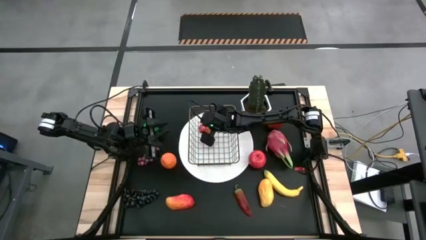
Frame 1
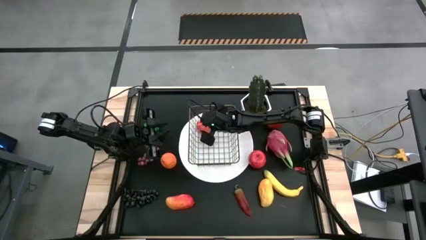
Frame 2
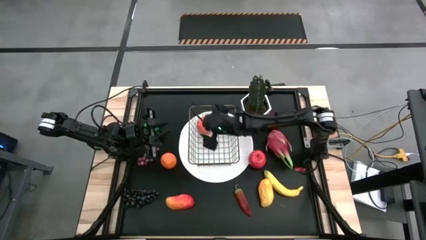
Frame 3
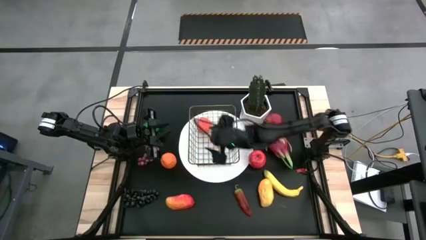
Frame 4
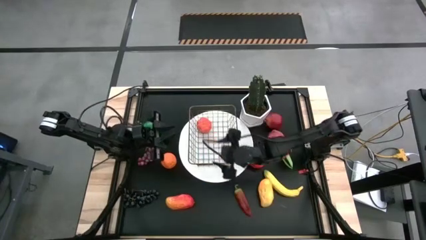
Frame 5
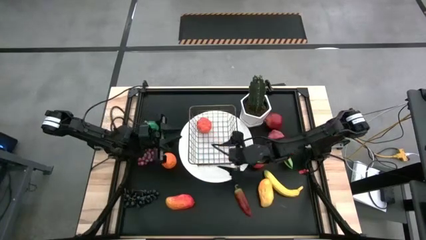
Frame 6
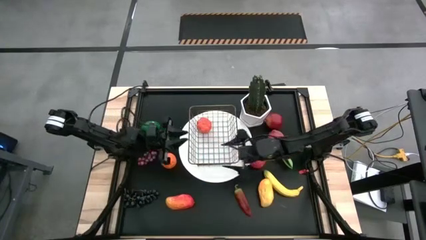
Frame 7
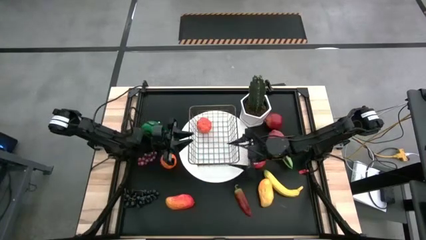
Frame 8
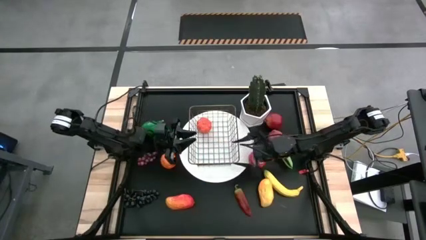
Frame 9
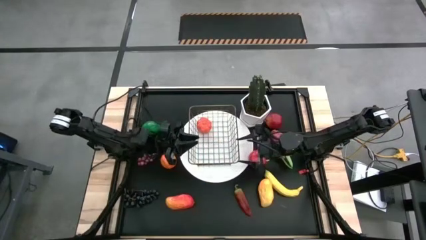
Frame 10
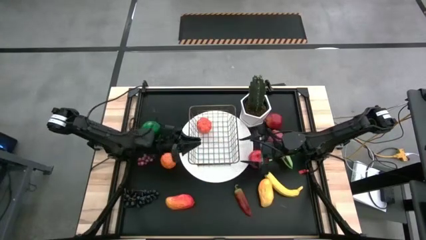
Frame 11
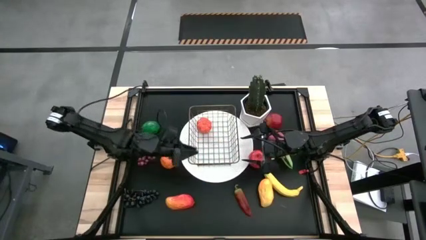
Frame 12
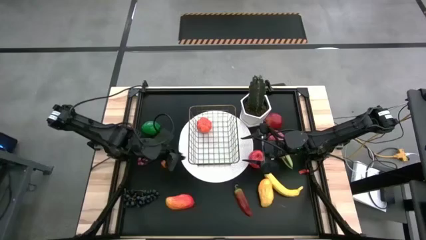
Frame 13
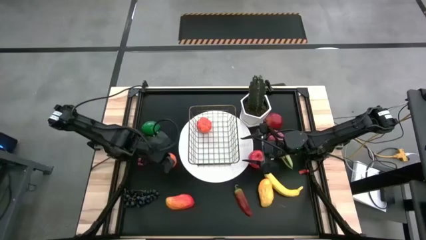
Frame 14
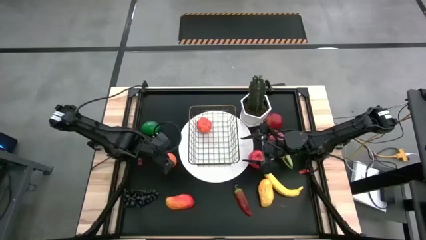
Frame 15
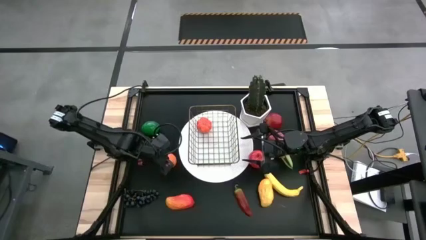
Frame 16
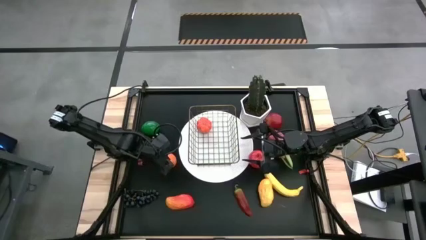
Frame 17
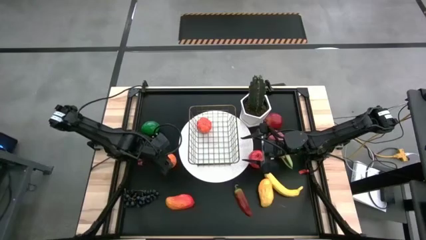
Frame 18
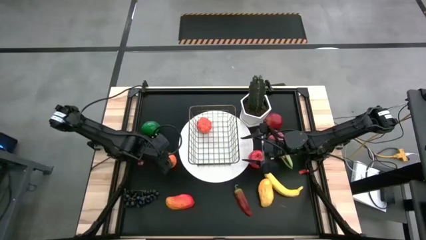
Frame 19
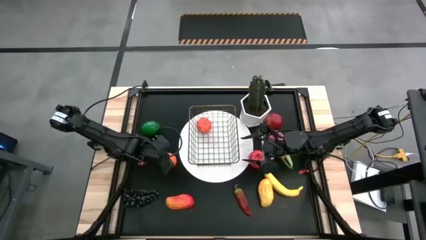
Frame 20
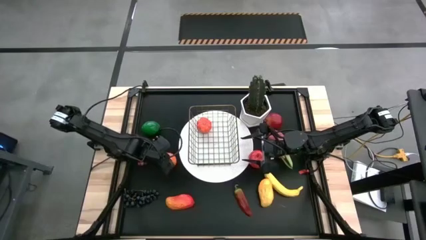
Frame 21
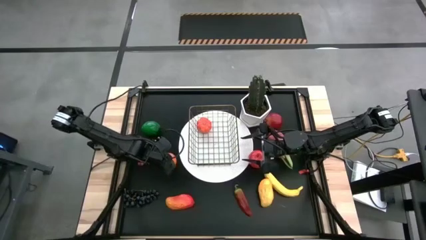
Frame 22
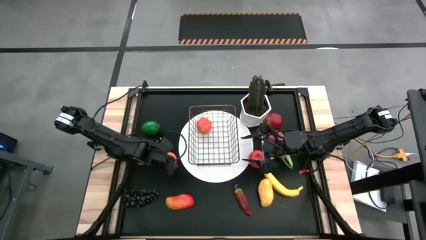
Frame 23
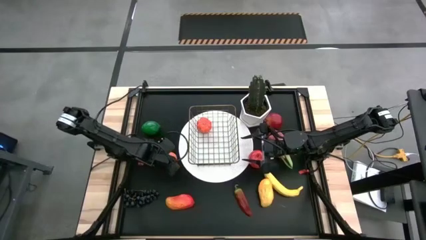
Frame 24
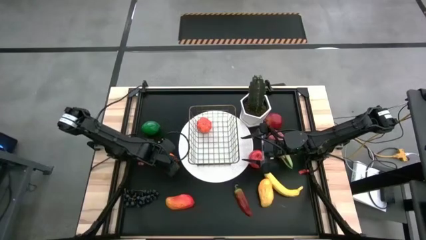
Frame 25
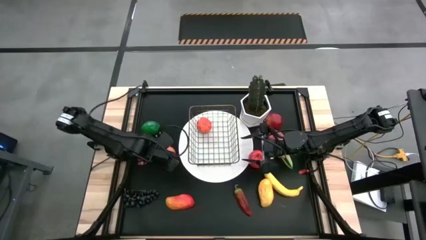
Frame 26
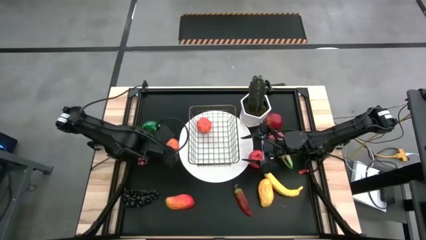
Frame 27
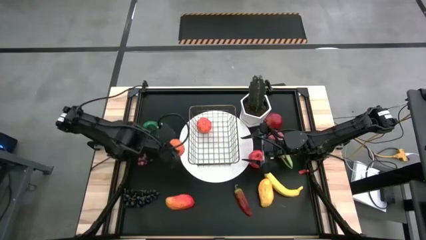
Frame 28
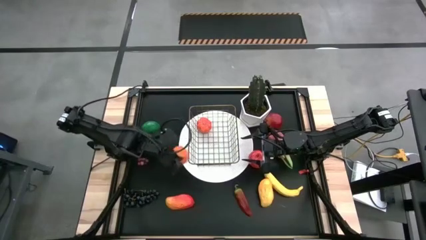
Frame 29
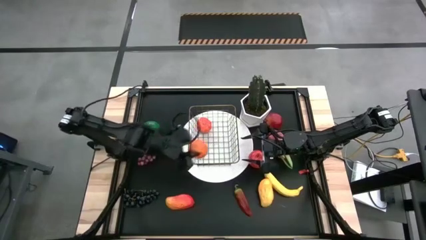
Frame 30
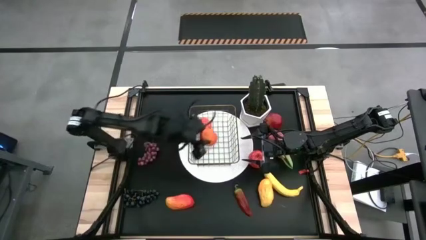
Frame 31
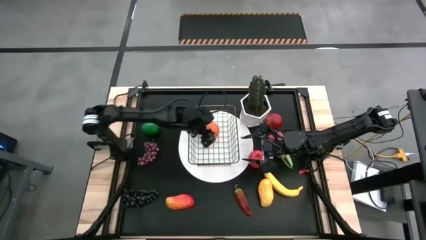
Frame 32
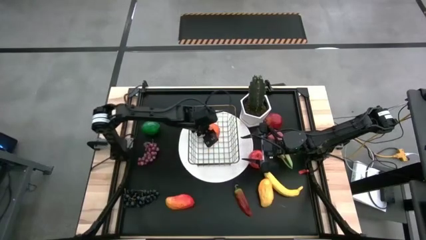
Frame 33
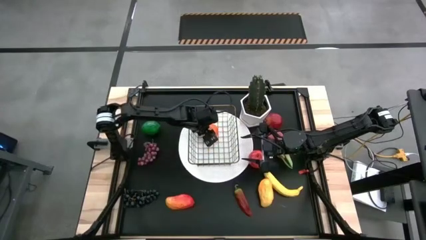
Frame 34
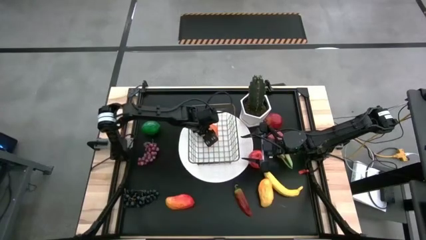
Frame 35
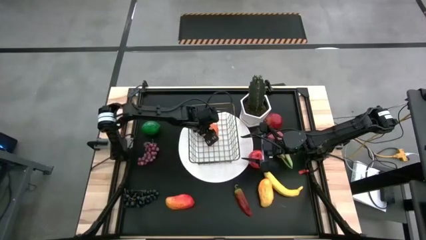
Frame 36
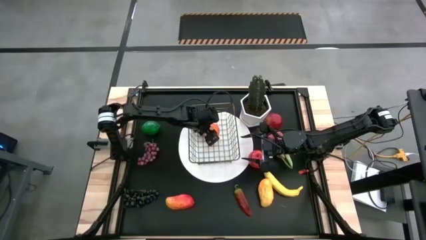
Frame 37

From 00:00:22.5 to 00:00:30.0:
Task: Build produce basket
Put the orange into the gold wire basket

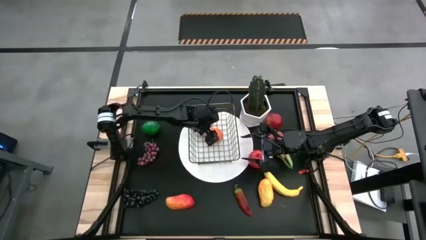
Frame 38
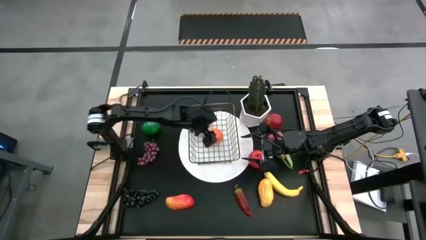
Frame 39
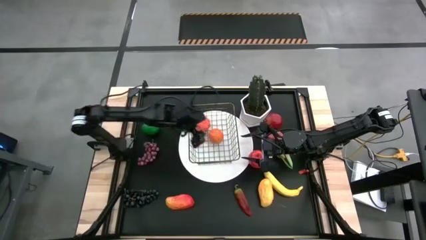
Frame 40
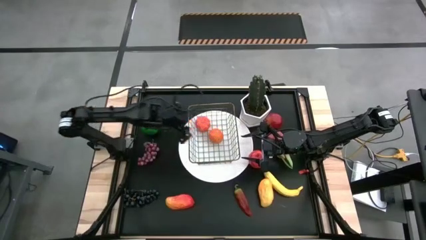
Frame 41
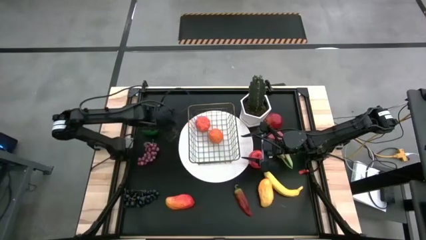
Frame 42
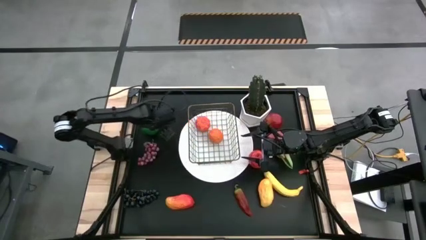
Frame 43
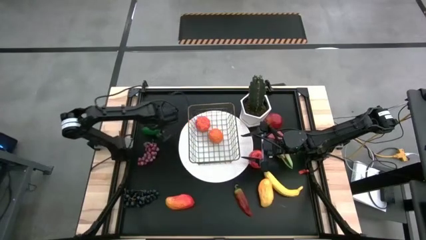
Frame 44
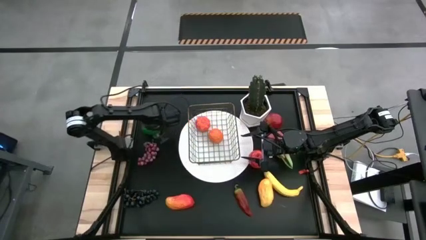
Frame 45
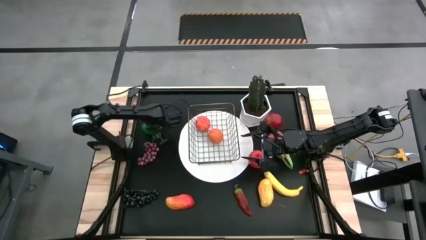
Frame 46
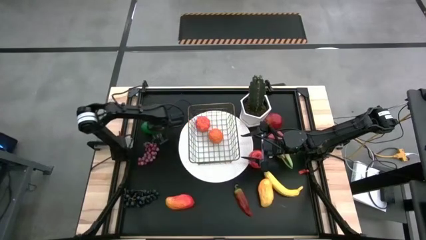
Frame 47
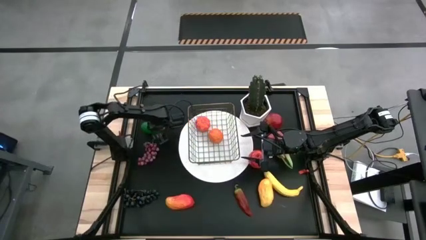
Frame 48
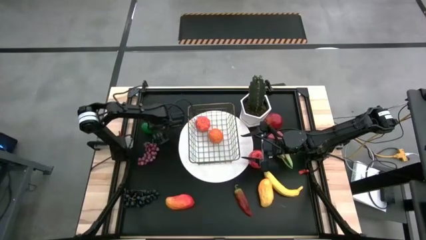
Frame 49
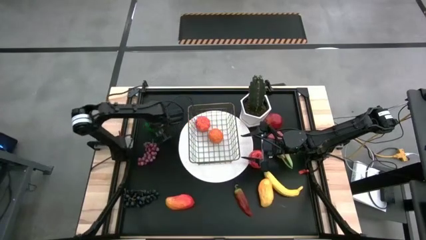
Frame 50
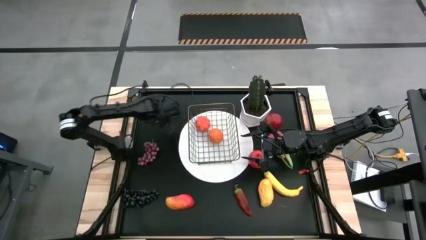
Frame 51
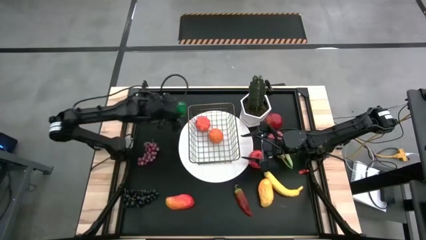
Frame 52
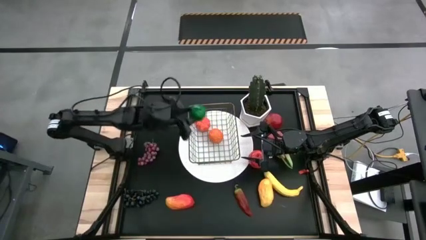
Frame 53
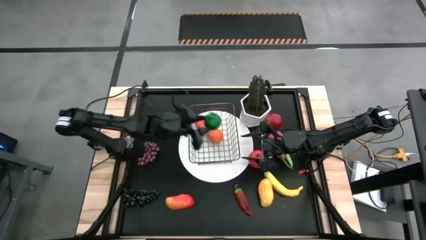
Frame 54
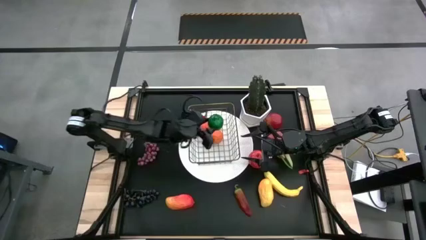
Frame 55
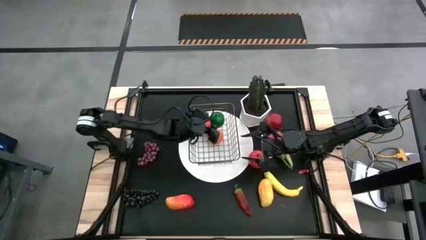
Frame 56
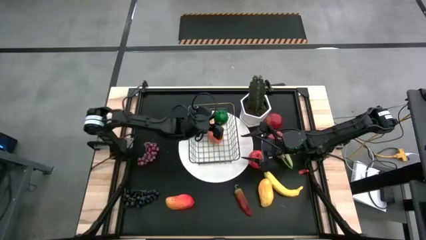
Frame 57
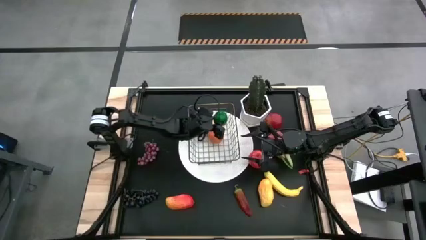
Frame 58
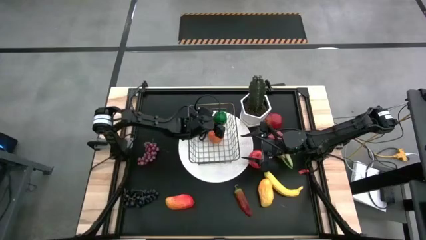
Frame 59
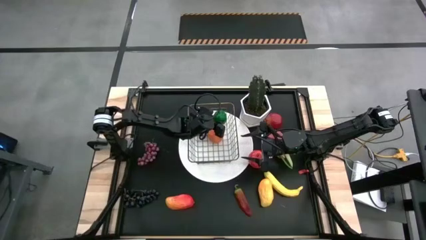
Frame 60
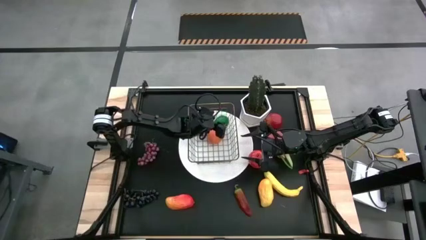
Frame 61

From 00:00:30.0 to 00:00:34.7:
Put the lime into the gold wire basket

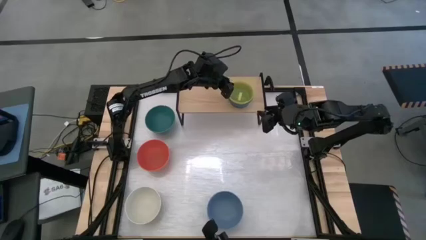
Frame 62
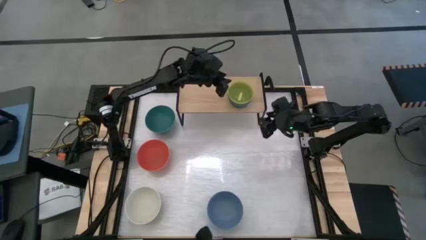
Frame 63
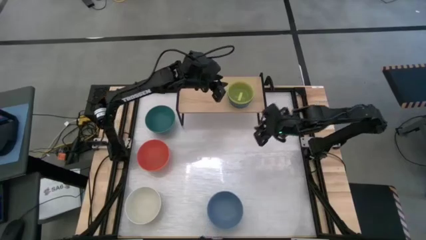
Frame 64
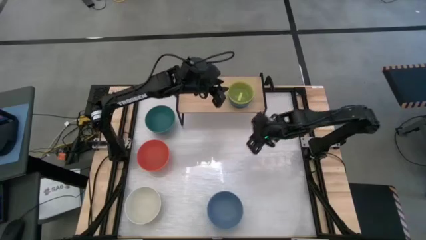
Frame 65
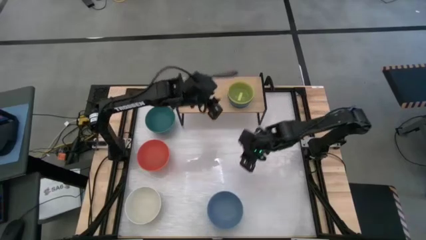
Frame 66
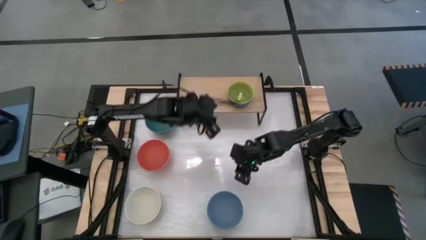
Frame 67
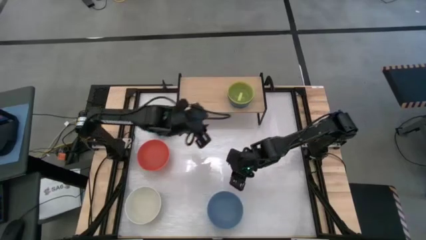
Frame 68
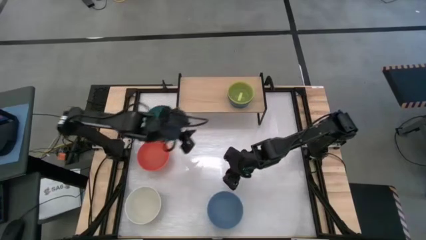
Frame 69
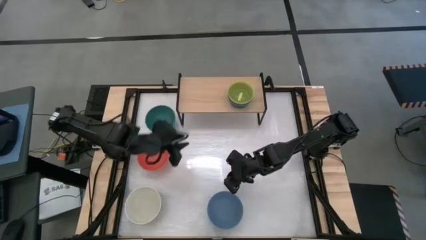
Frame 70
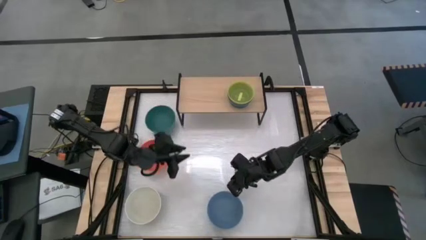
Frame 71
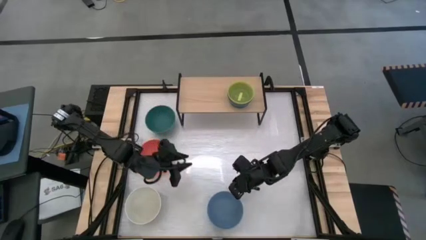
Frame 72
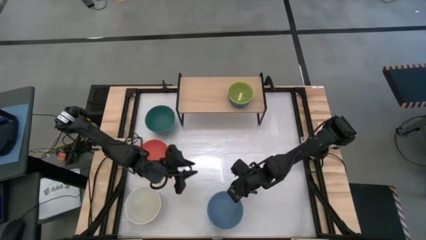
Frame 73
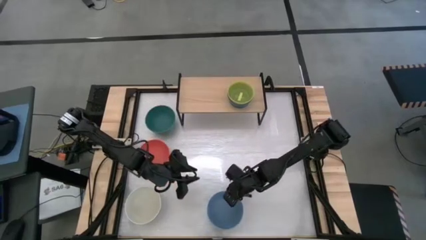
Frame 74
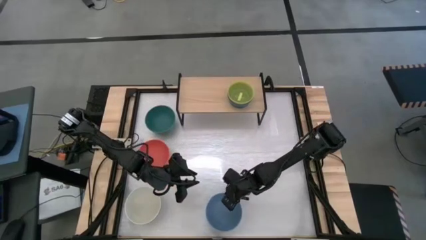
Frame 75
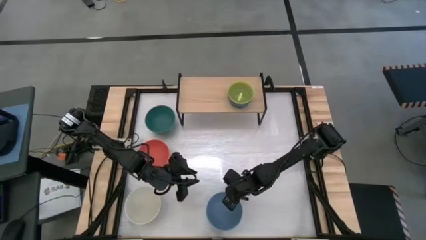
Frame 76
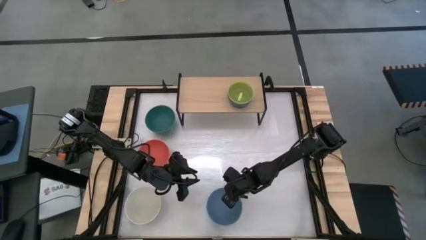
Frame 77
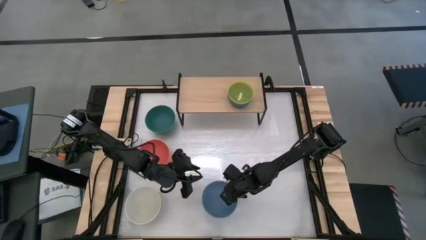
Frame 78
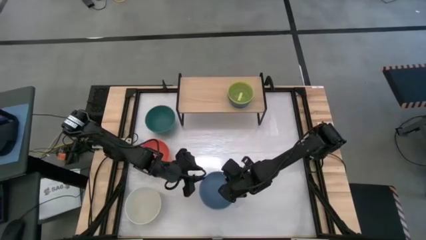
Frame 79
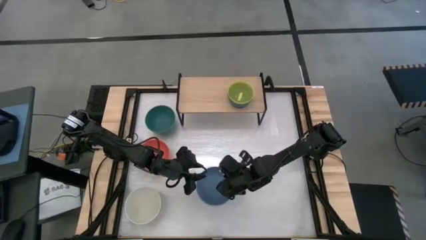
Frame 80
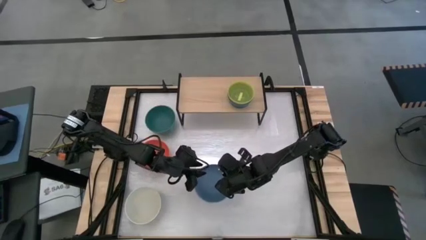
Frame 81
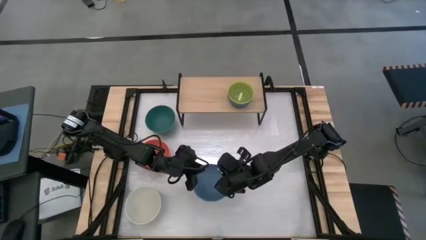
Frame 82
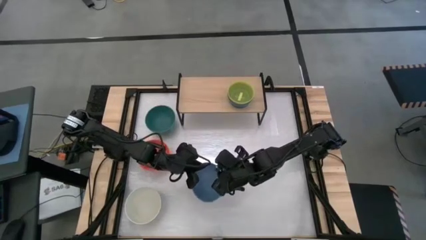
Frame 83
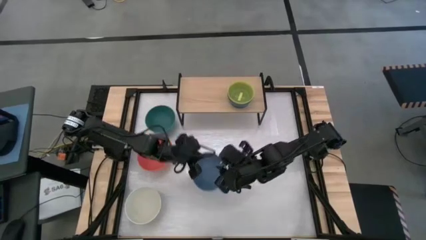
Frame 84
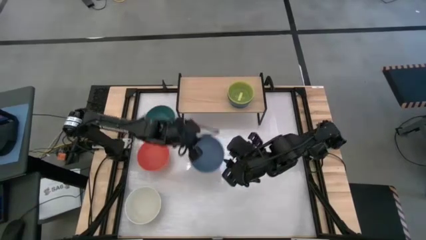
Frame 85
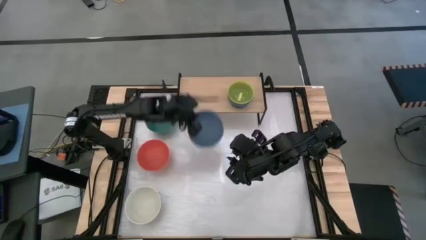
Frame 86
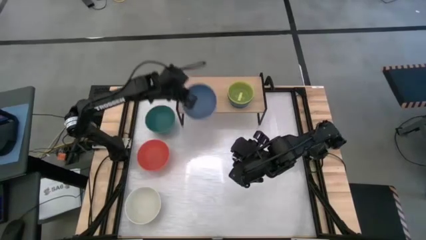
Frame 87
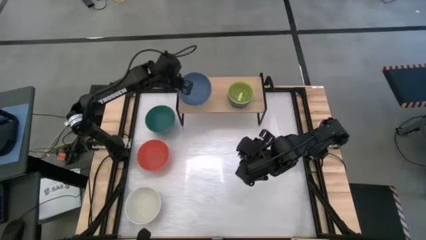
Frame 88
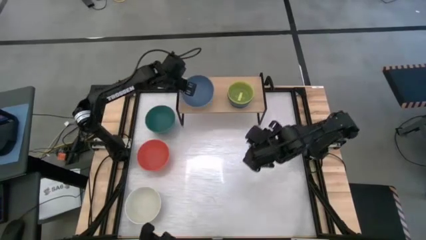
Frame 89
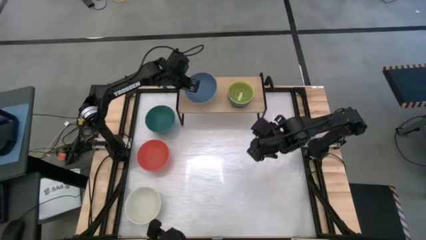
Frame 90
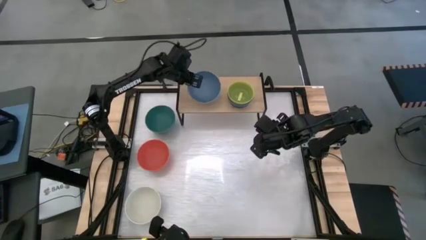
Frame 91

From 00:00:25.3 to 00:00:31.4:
Task: Place and stack bowls onto a shelf
Put the blue bowl on the shelf
